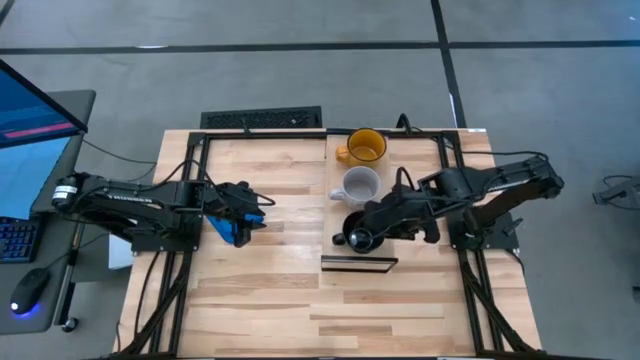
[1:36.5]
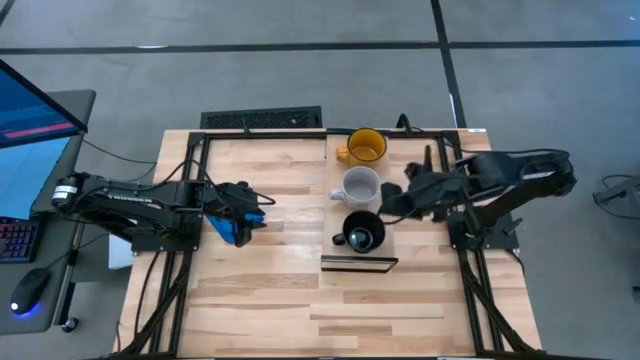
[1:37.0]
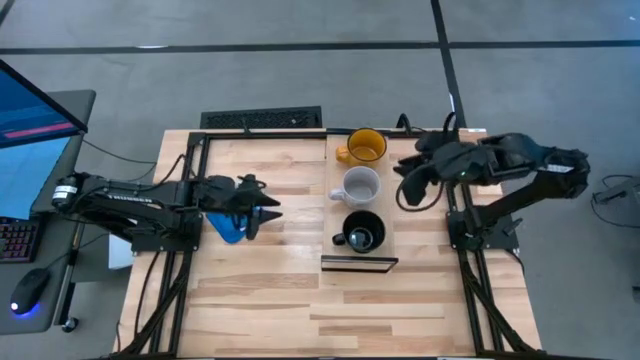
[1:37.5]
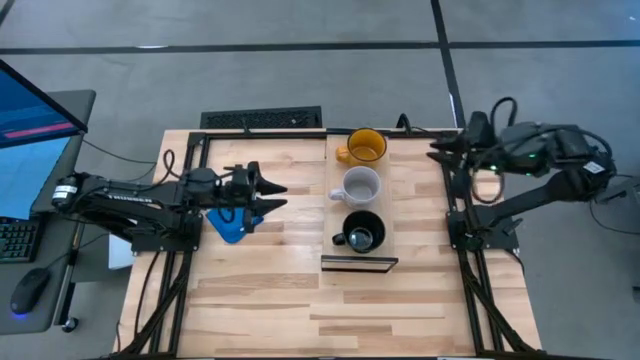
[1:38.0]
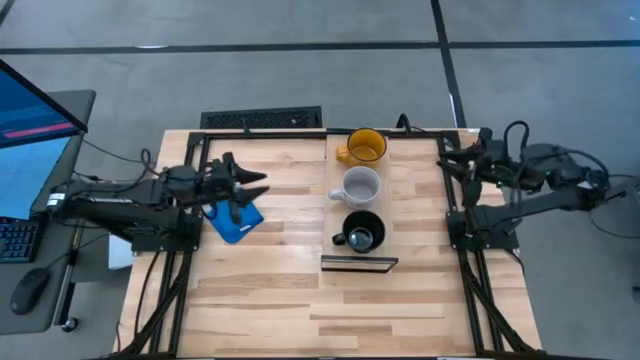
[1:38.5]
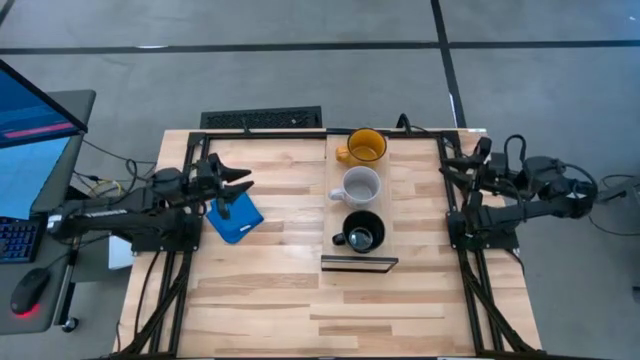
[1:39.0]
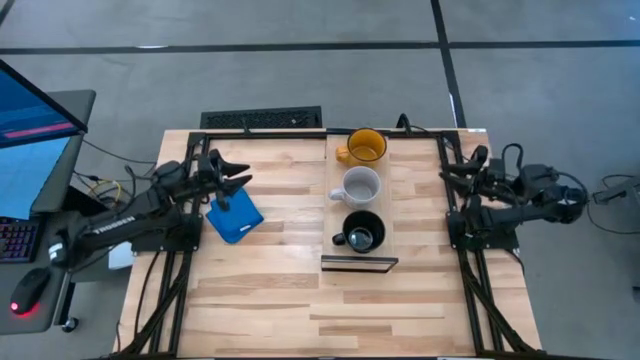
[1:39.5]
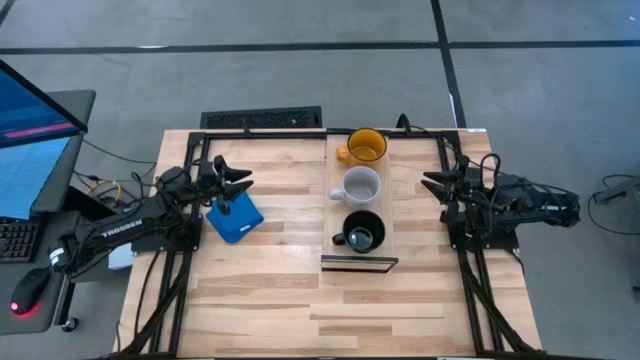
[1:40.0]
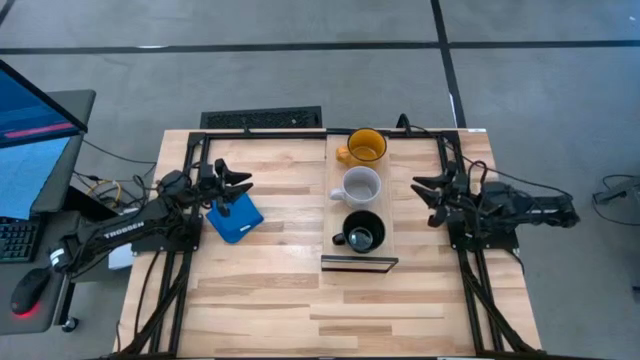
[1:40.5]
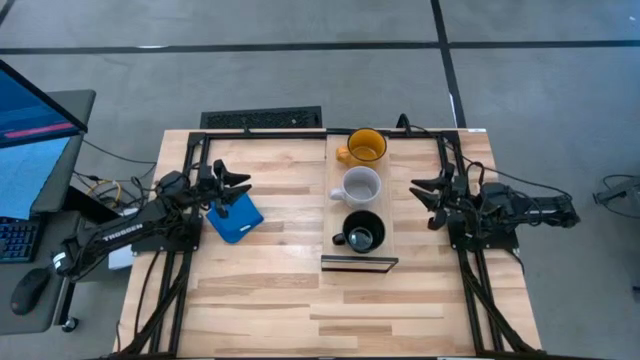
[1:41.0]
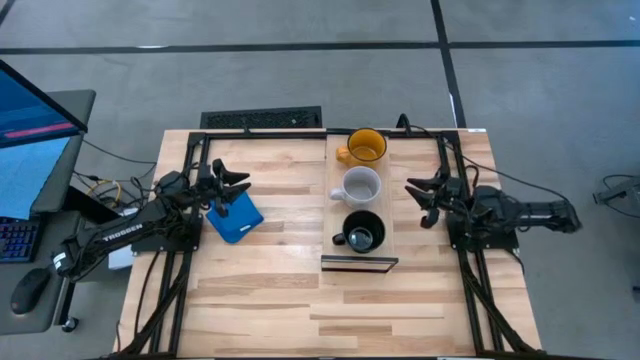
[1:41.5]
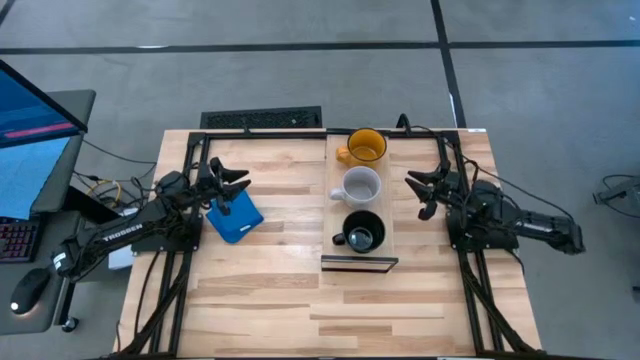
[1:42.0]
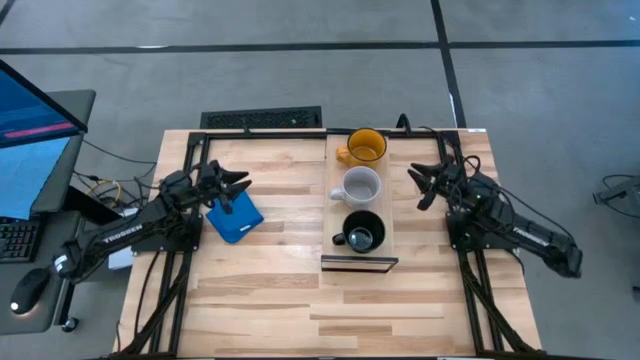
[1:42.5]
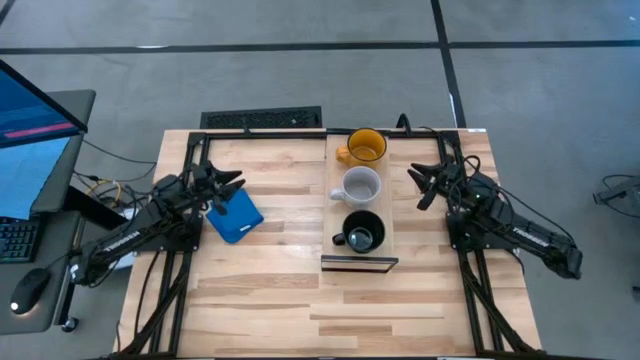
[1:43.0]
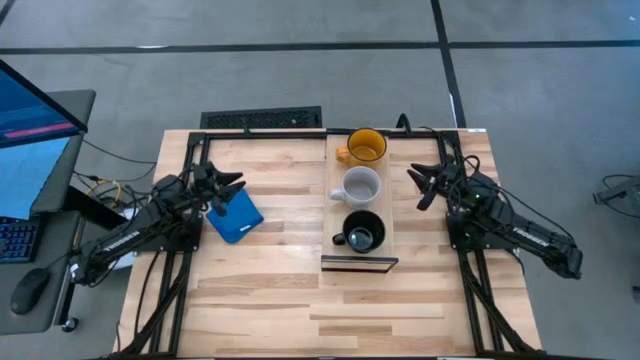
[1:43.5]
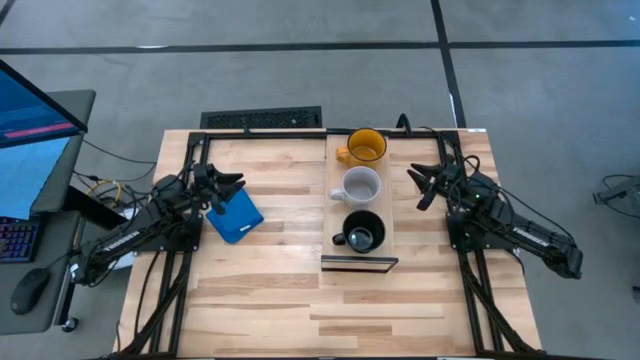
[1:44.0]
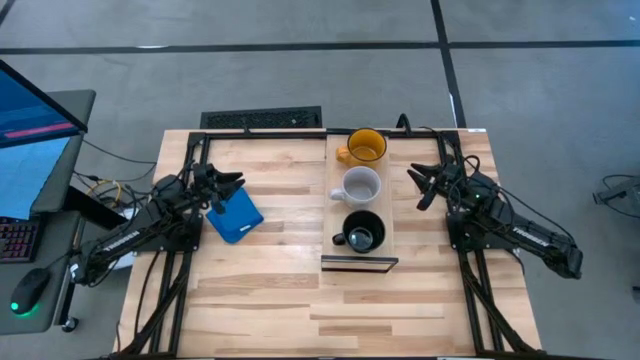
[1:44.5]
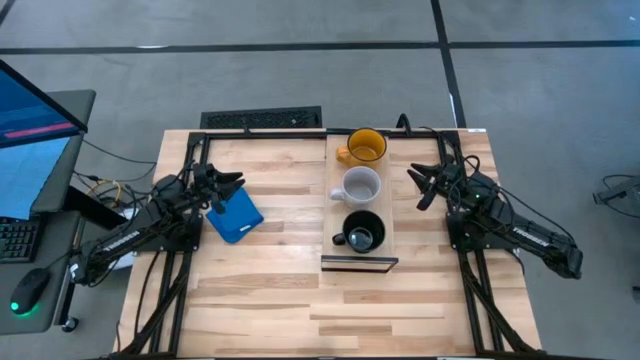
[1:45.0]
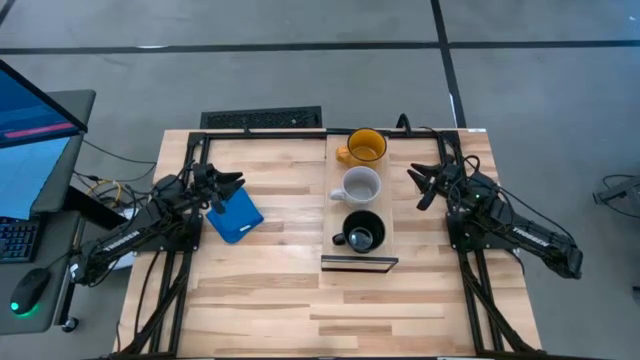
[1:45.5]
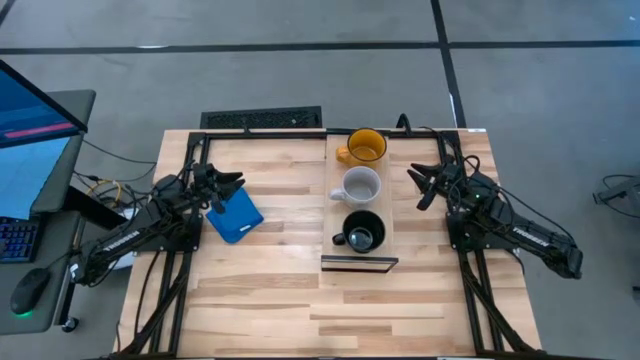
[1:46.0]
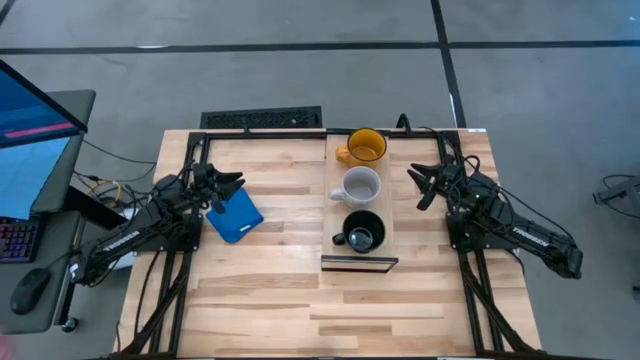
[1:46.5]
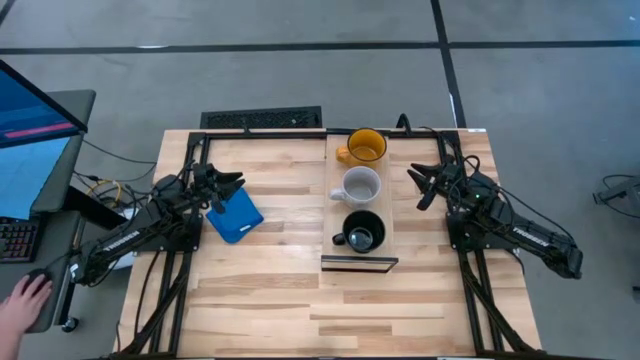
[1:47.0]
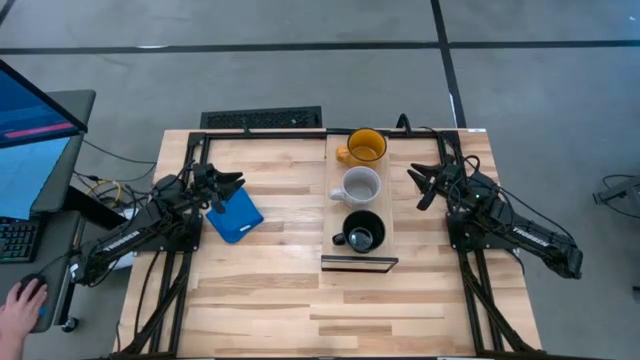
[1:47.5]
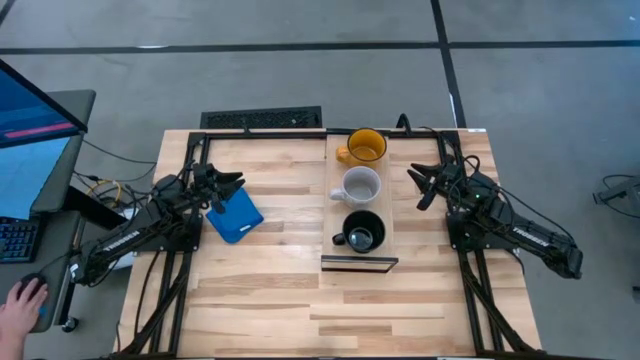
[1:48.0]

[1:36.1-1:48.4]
Task: Stack small to large cups/mugs on shelf
Return to Home Position

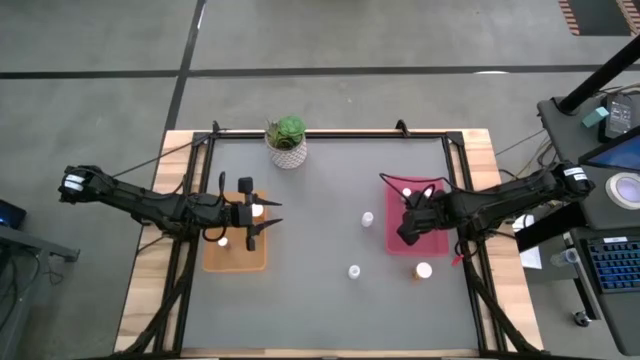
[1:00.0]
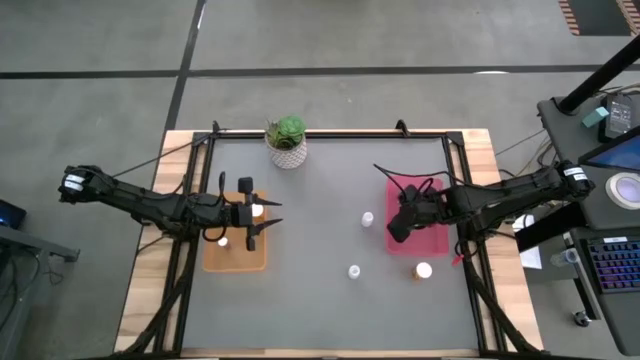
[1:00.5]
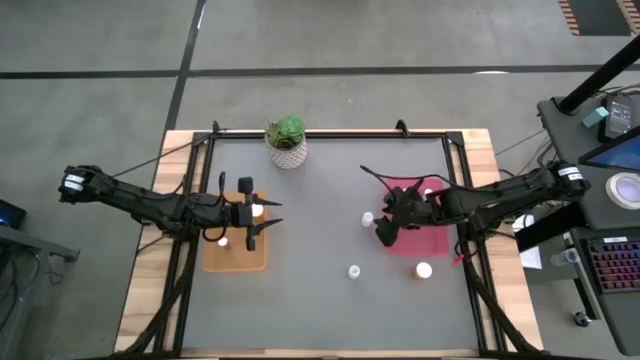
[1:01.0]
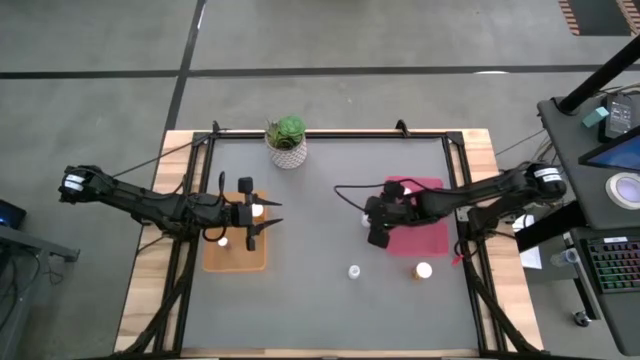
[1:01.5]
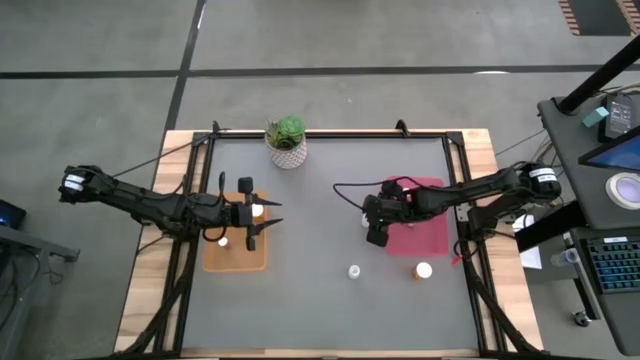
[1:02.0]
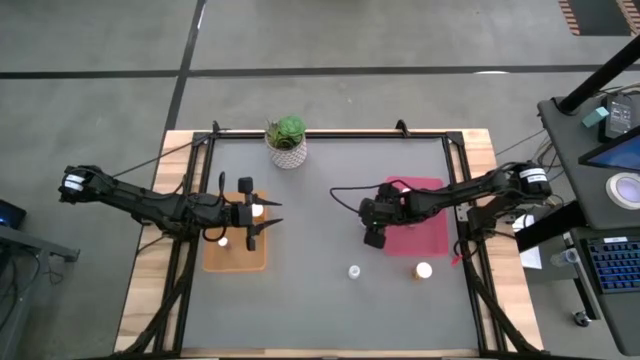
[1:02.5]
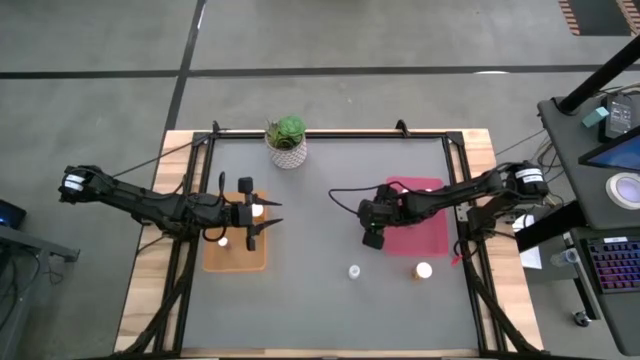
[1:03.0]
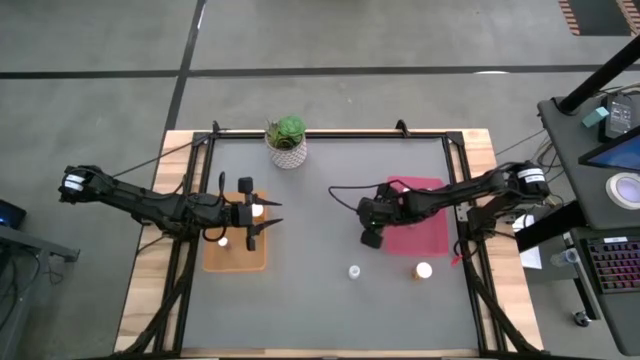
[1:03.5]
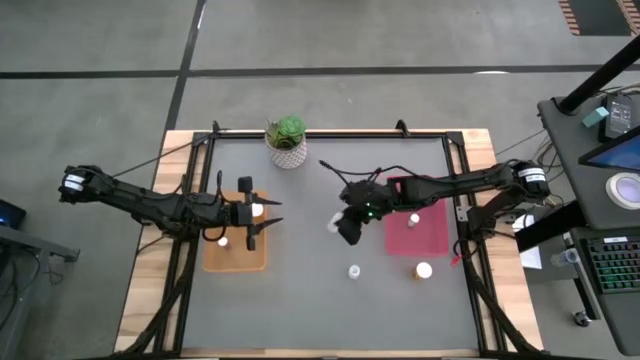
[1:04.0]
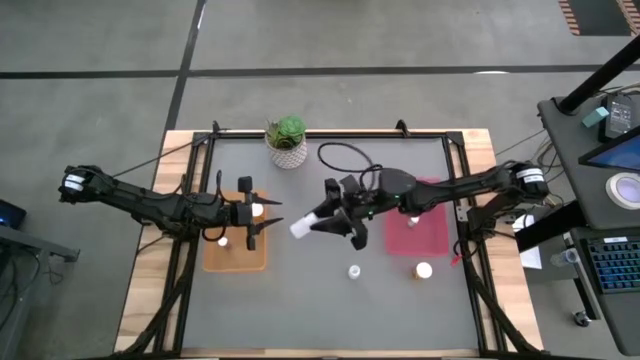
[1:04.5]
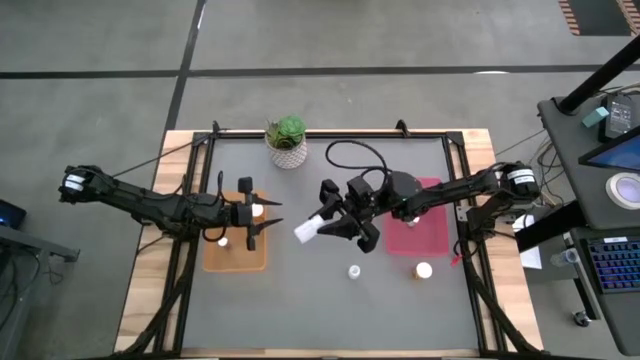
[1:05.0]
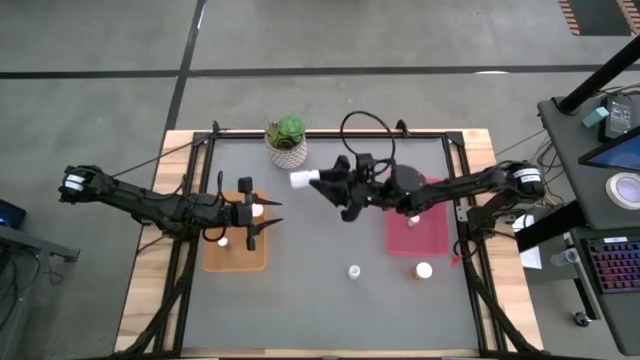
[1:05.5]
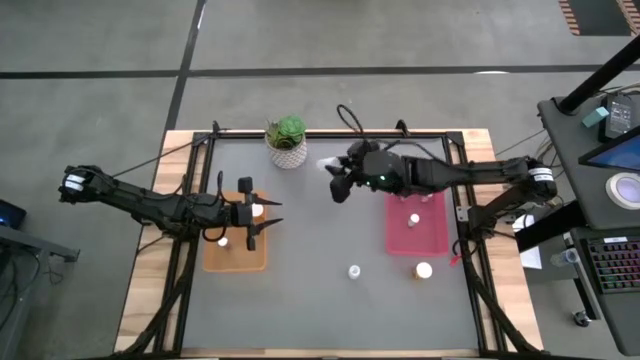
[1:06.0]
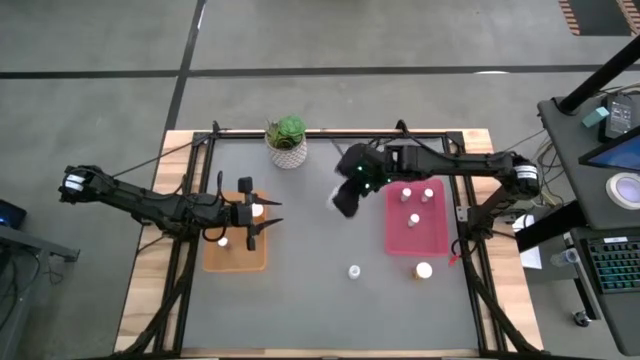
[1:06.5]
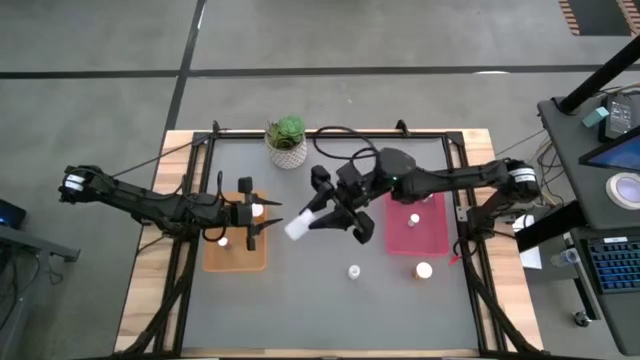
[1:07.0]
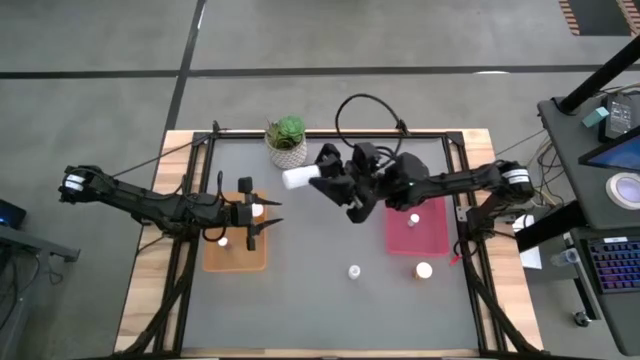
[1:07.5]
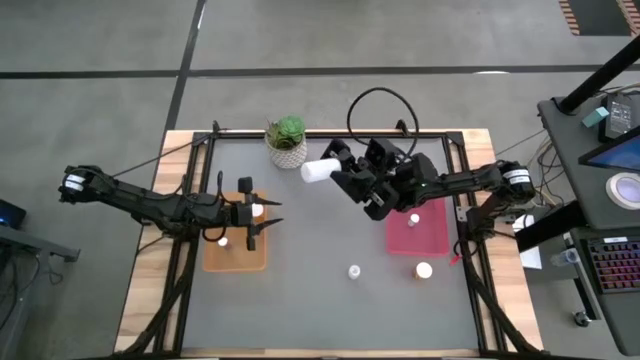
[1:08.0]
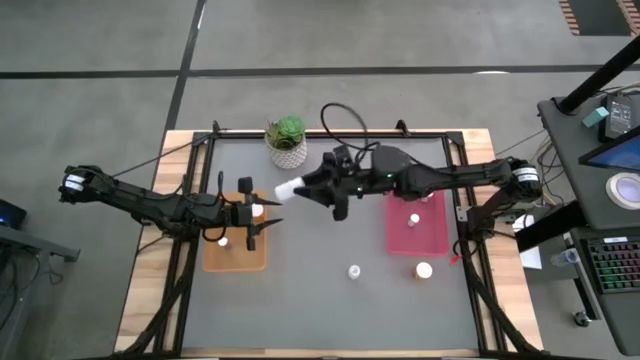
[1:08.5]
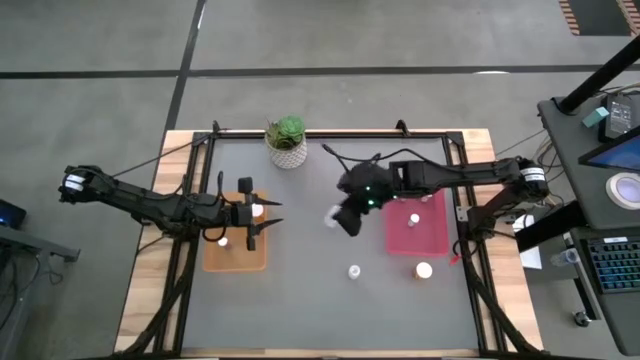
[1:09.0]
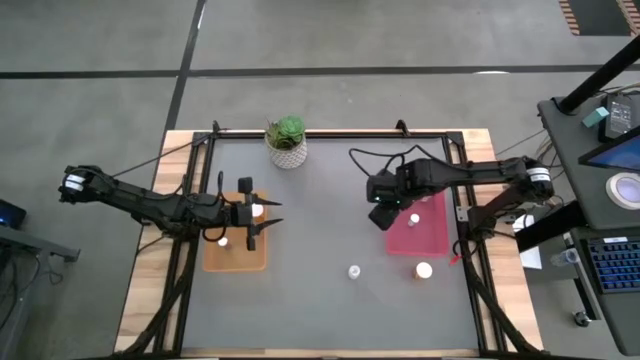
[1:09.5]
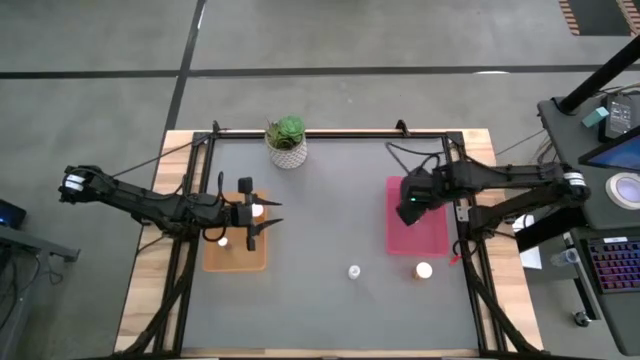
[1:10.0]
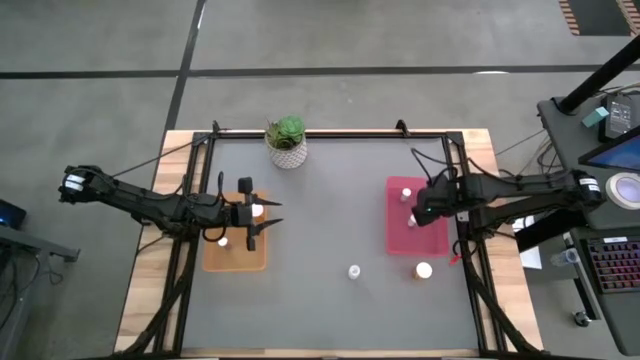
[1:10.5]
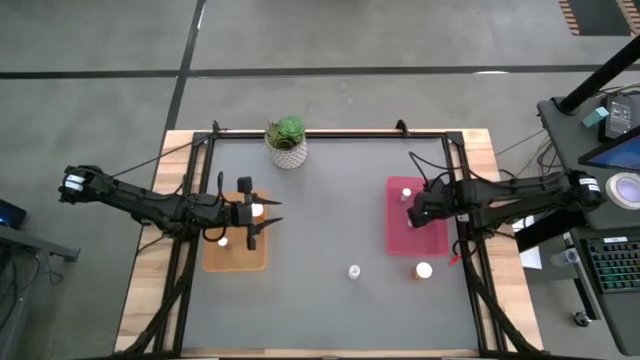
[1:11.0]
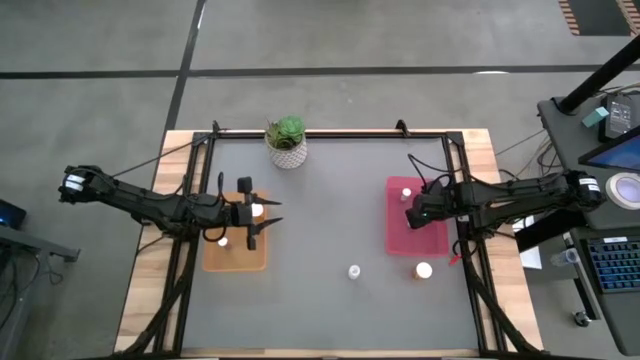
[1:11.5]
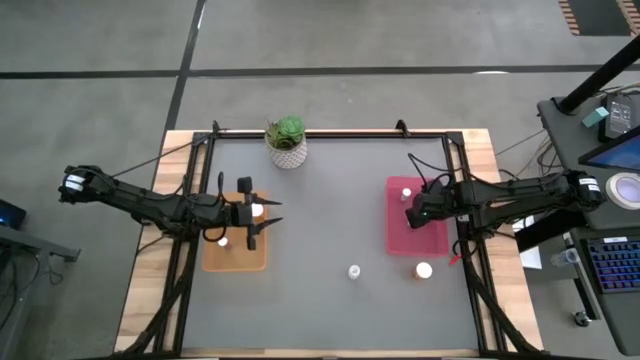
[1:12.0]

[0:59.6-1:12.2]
Task: Pick and place medicine bottles into bin by pill shape (circle, oval)
Put the top white tablet bottle into the pink bin
